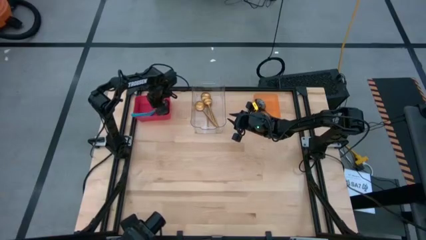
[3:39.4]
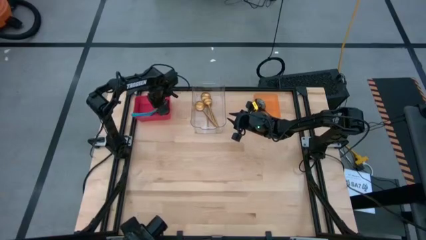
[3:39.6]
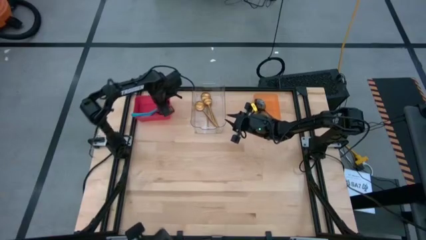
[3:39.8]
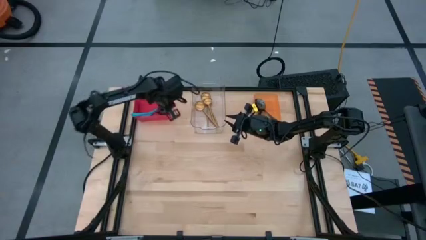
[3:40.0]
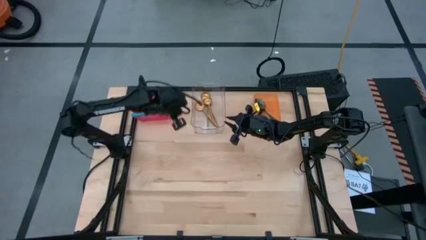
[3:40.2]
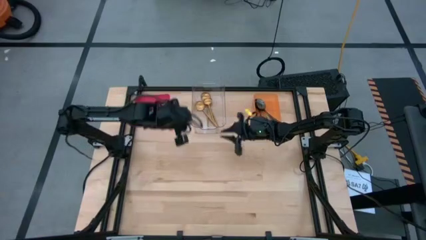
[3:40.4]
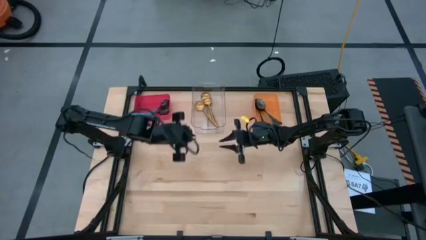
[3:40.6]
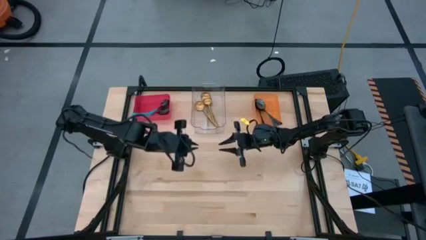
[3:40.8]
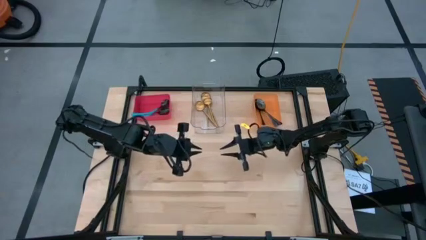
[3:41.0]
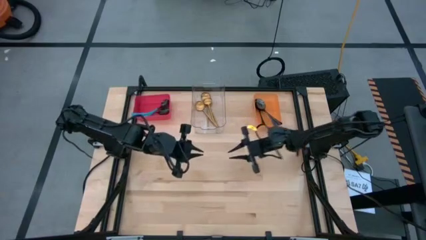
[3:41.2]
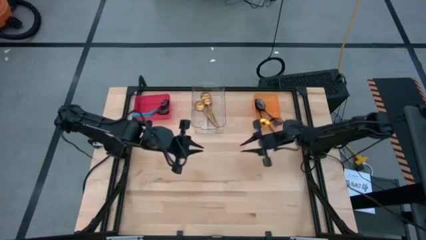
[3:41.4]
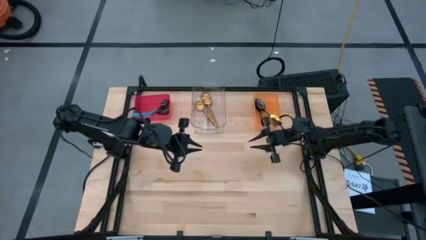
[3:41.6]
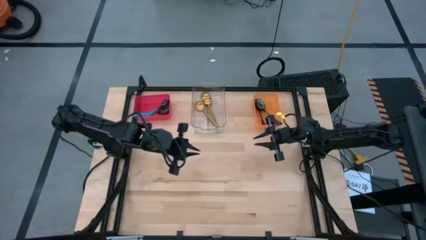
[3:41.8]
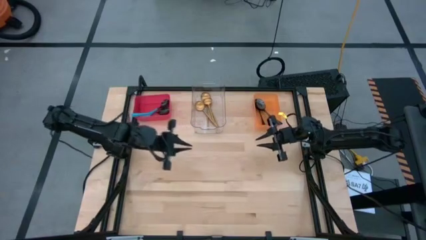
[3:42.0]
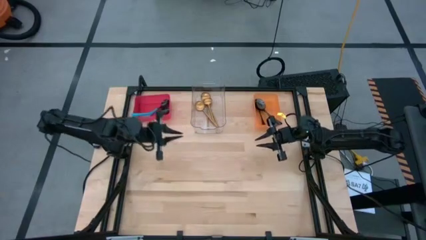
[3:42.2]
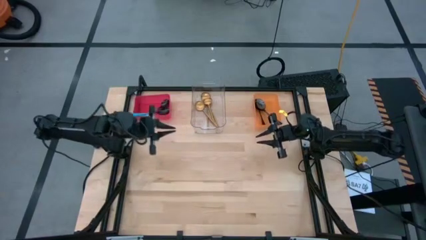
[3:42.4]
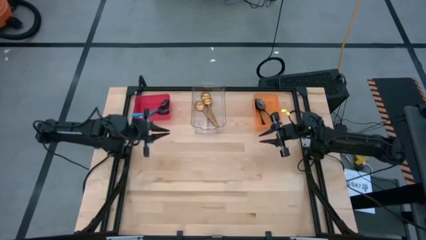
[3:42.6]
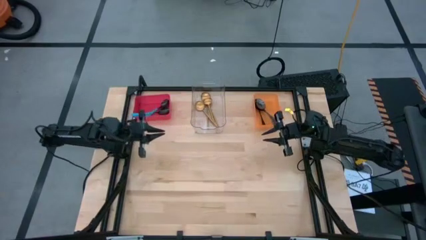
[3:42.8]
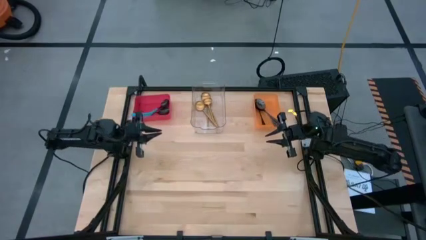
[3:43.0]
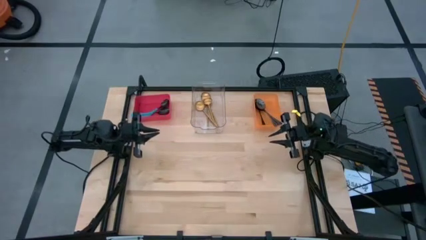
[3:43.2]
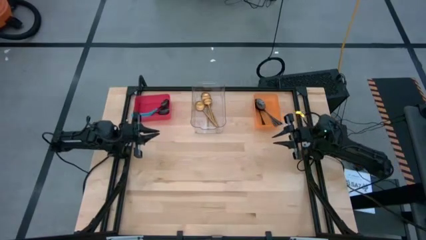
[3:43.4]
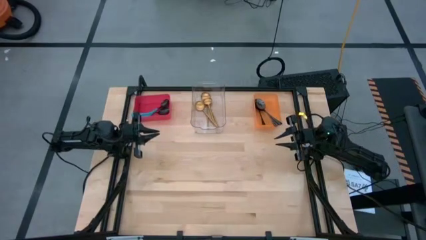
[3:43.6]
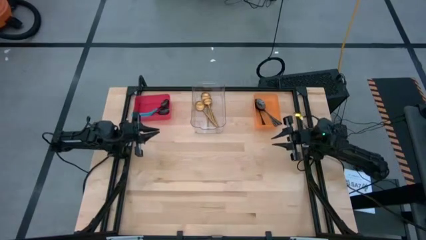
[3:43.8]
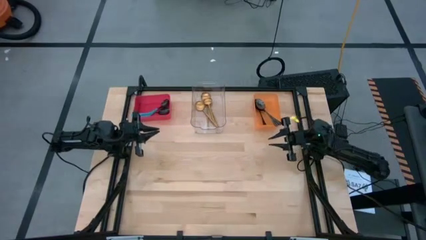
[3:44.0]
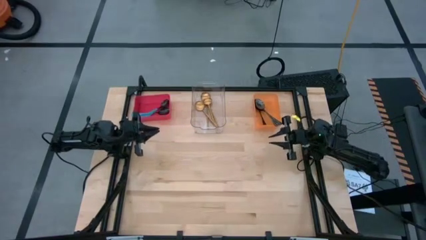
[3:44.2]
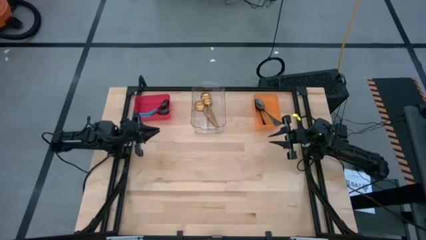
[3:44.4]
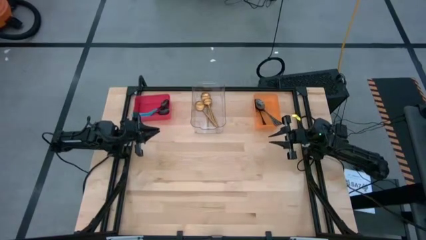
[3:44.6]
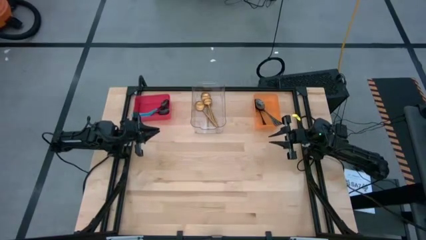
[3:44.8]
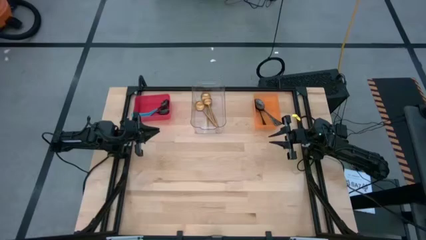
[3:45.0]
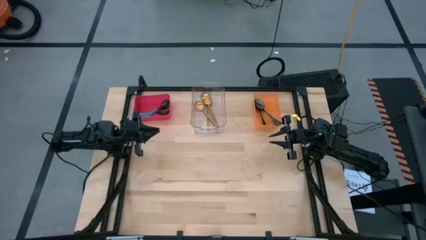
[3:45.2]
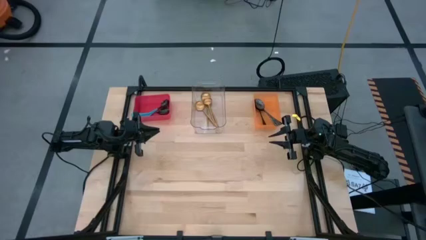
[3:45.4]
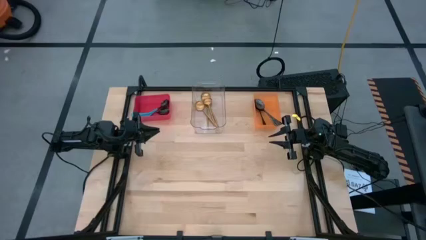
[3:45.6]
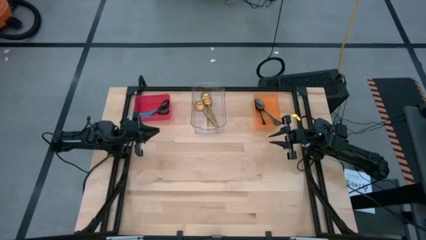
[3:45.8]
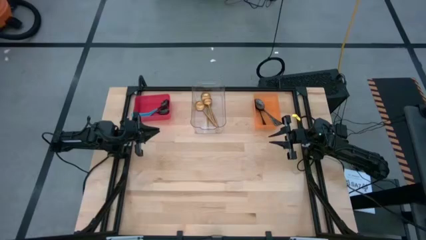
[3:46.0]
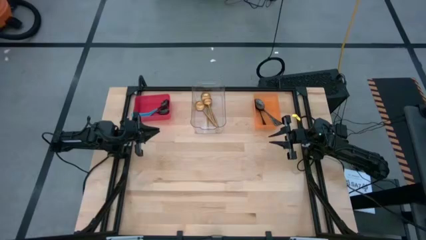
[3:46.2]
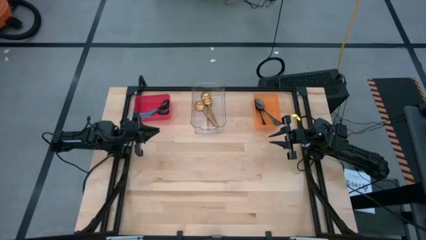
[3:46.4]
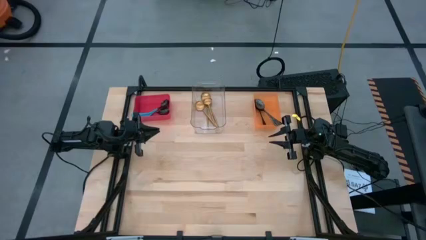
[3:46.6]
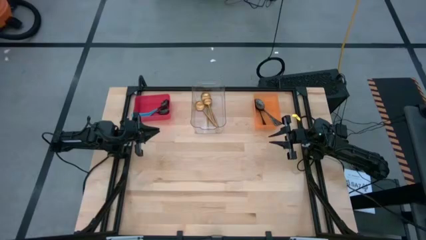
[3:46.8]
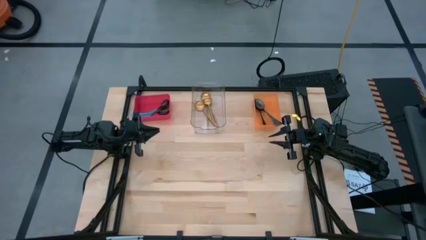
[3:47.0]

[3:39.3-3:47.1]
Task: Sort silverware by color (type)
Return to Home Position

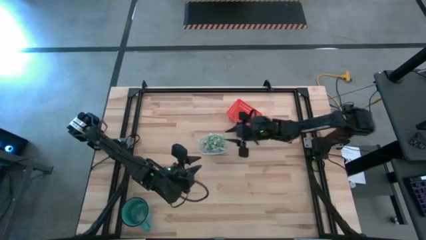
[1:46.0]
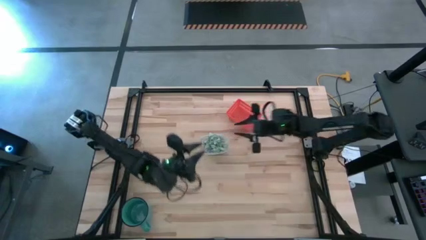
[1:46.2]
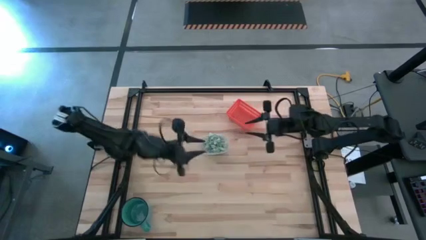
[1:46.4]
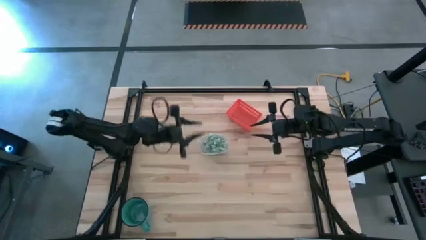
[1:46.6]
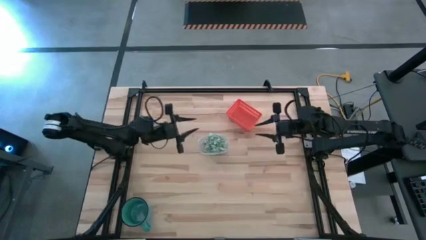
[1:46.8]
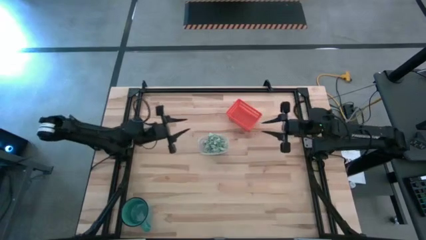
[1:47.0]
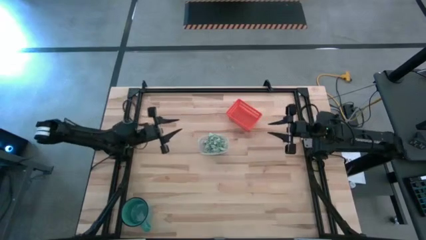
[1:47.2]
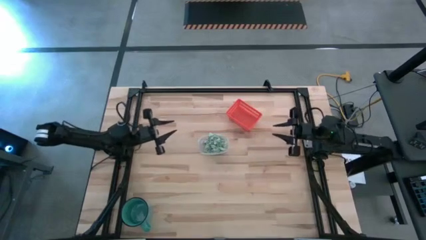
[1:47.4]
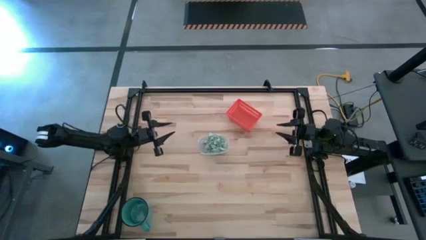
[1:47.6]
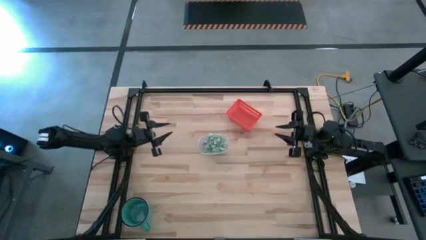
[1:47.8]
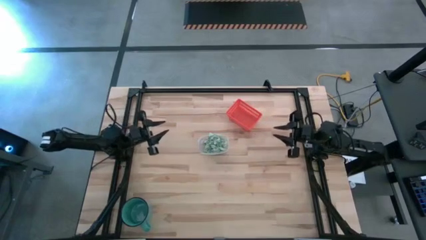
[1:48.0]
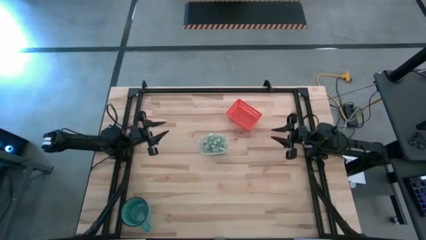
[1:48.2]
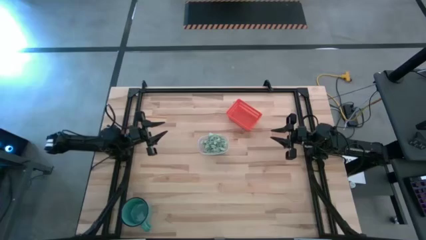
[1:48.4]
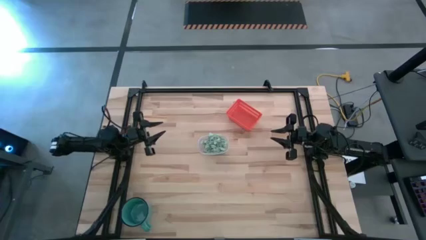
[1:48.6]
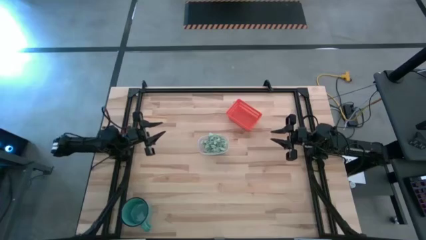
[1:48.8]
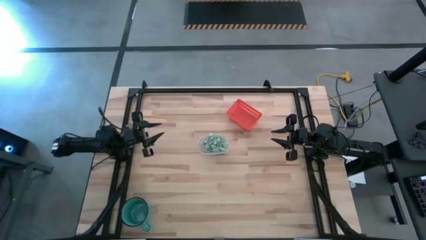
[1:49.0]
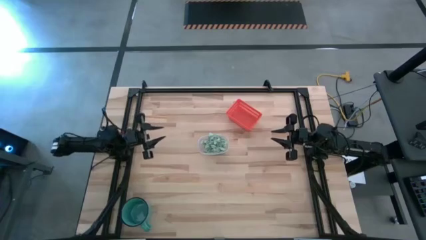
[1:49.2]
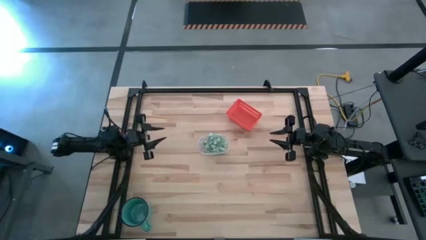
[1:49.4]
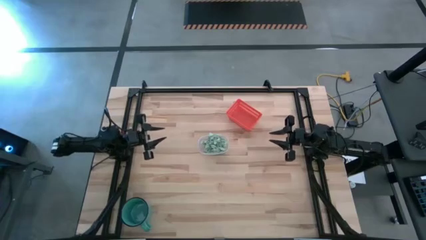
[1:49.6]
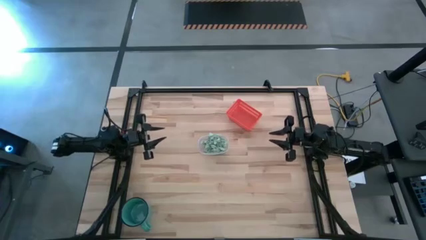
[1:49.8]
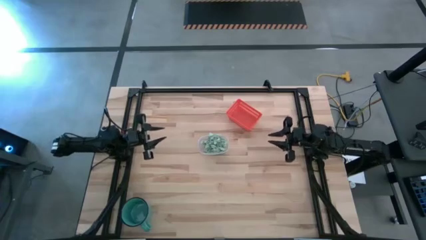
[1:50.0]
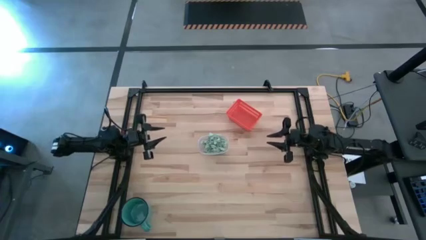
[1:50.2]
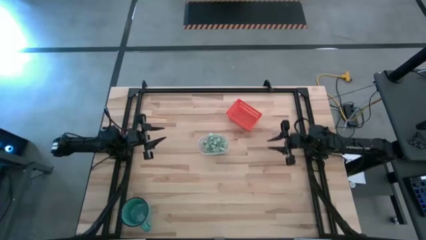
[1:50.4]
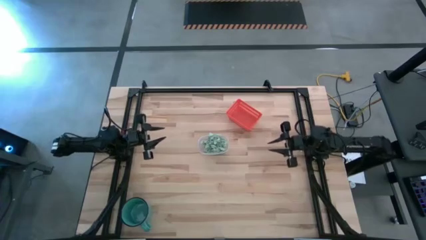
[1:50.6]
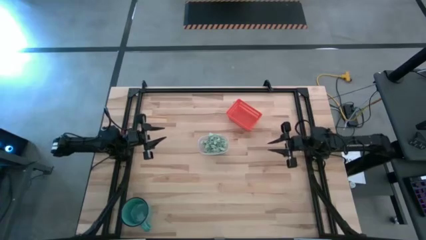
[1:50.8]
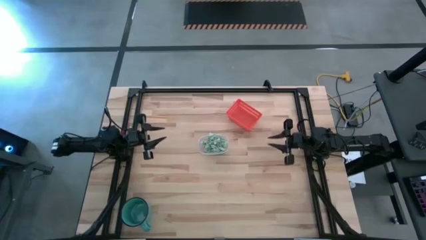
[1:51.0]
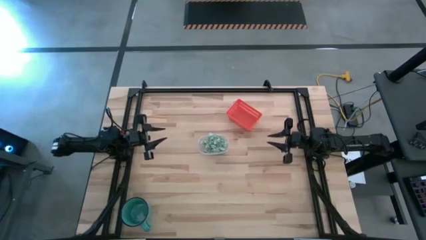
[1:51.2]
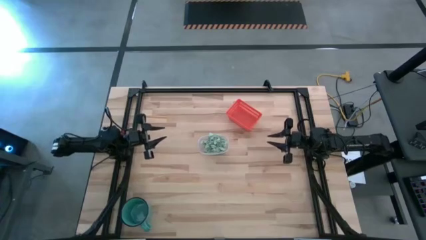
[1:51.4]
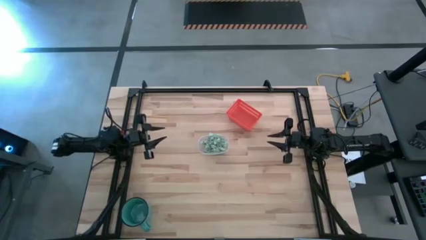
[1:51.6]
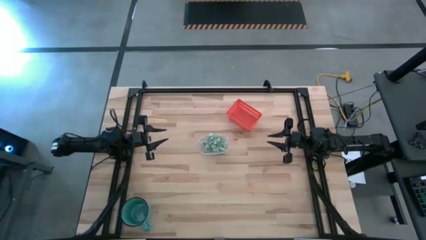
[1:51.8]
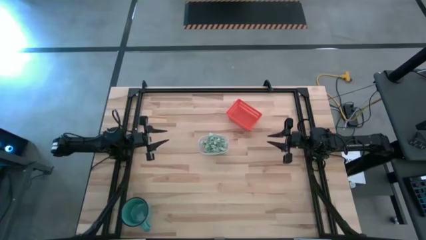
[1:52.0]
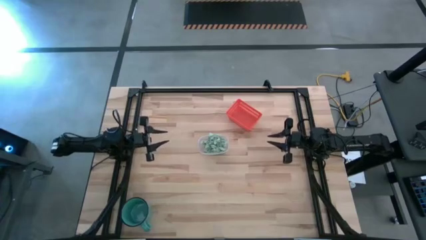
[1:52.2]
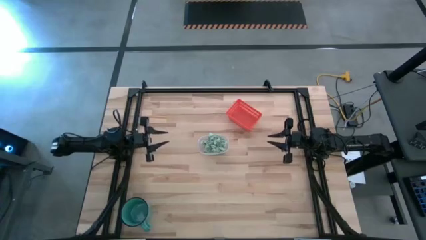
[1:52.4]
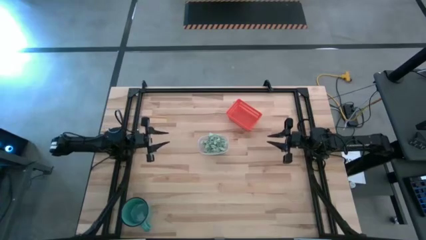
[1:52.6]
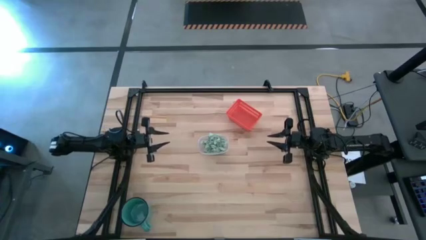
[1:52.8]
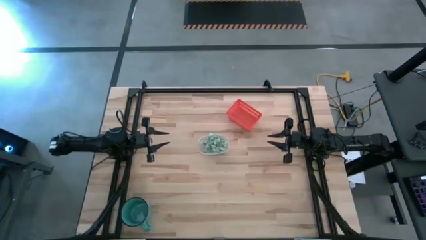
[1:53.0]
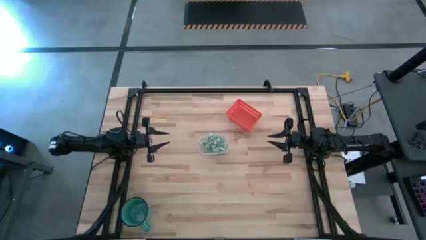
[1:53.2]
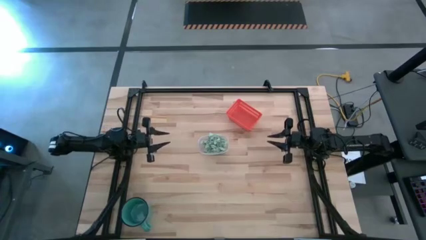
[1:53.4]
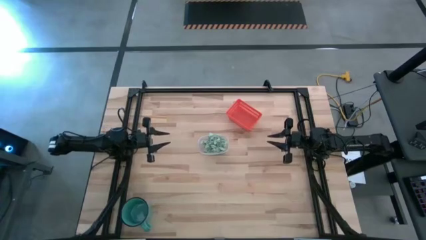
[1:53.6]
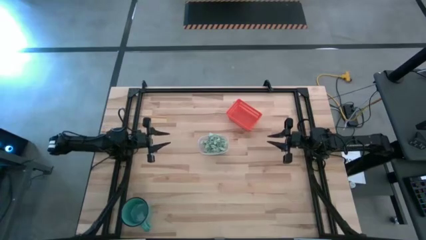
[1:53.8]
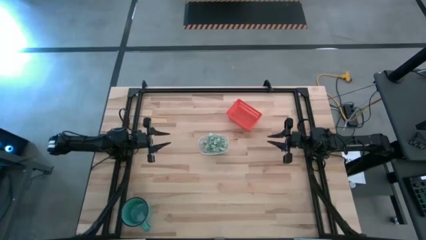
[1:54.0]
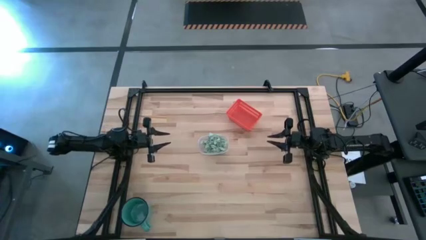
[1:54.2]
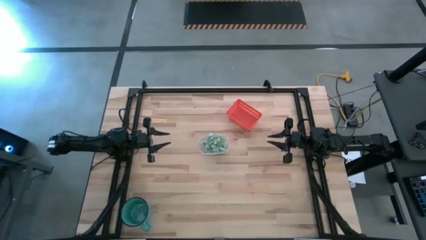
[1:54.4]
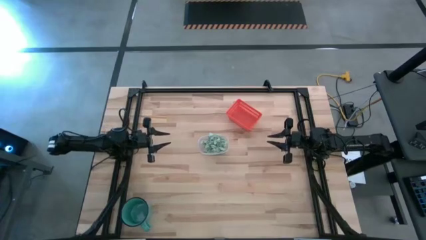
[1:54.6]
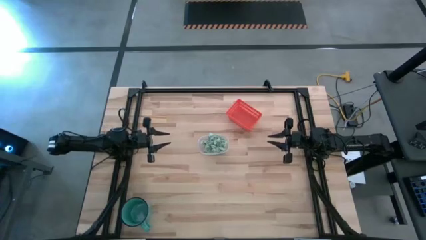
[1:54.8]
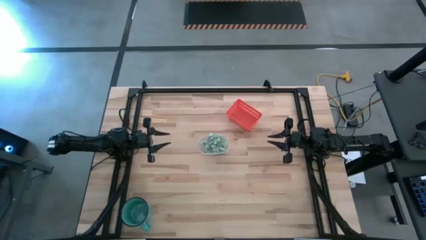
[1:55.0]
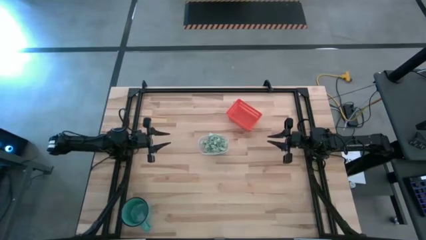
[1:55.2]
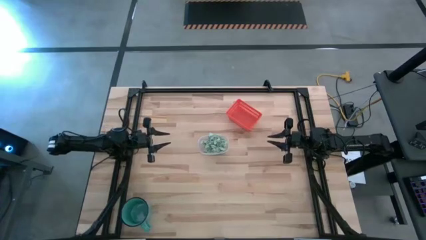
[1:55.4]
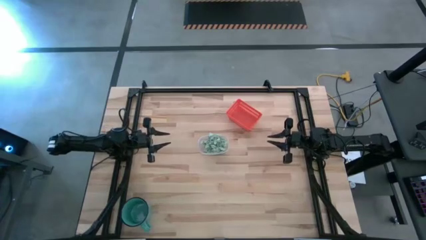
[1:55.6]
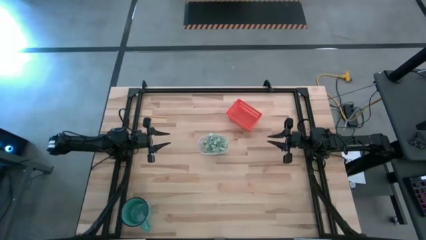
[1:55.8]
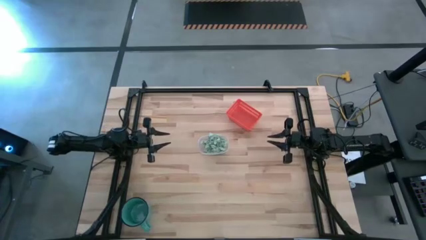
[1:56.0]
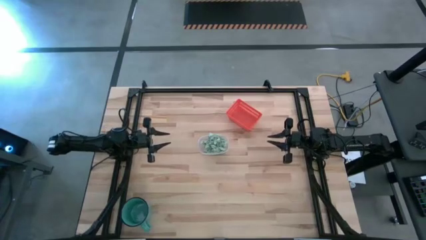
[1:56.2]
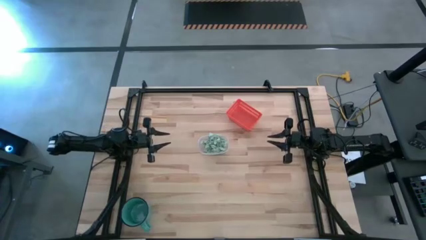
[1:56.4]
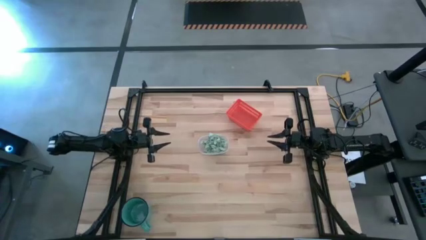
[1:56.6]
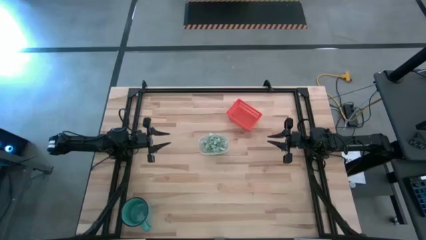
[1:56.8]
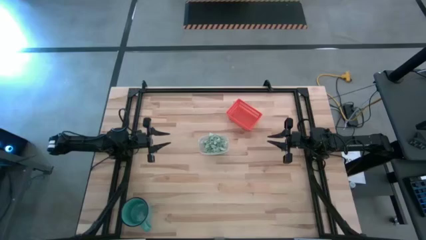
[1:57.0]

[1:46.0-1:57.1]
Task: Pick and place items into bin
Return to Home Position
